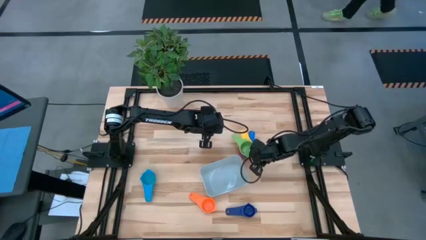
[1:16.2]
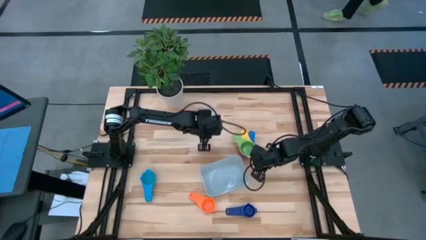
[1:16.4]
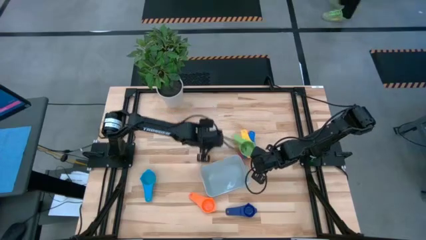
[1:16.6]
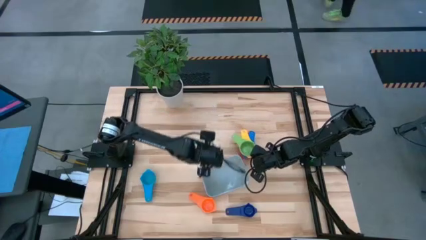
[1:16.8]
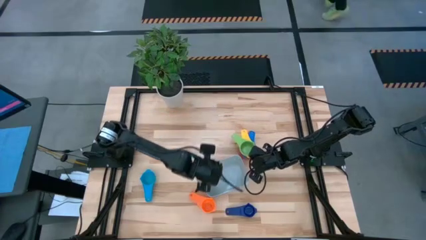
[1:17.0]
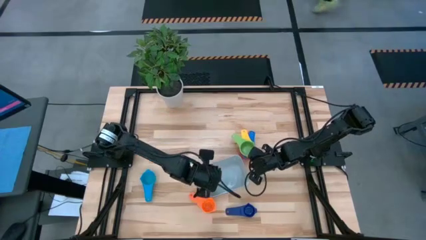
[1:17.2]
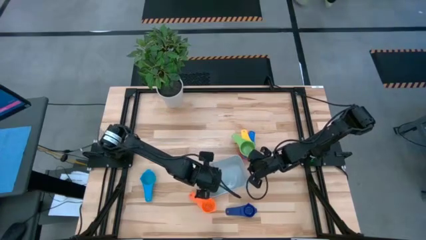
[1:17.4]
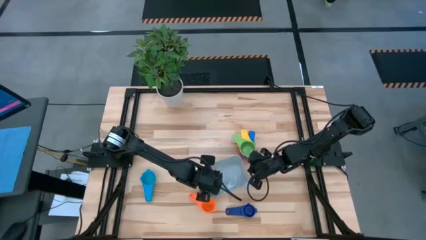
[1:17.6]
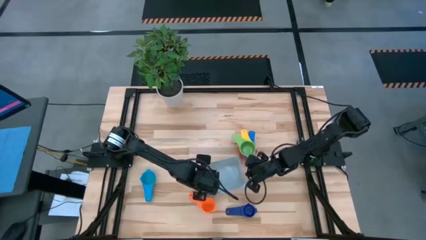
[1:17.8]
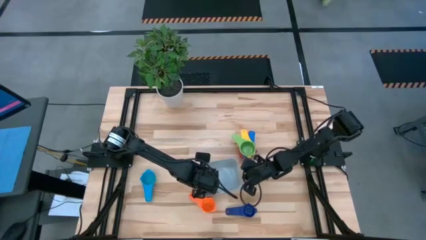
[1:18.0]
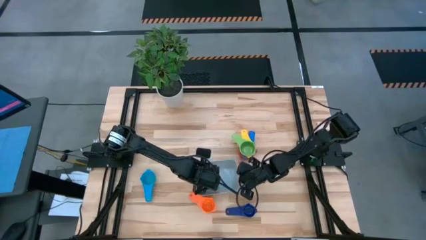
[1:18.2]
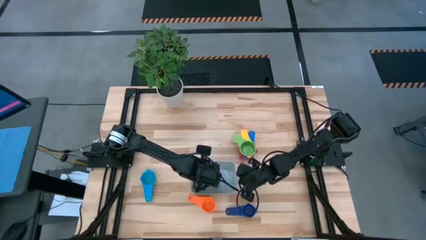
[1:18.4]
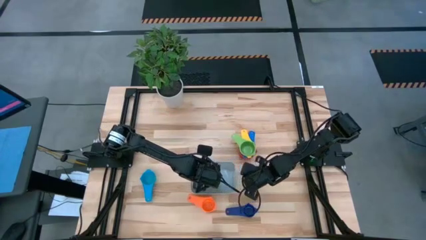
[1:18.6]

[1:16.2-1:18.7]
Task: Nest measuring cups in basket
Adjust the gray bin

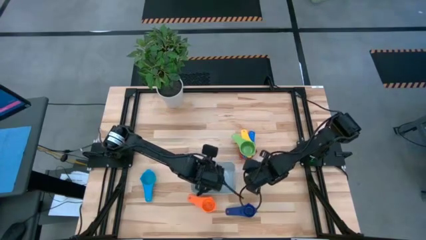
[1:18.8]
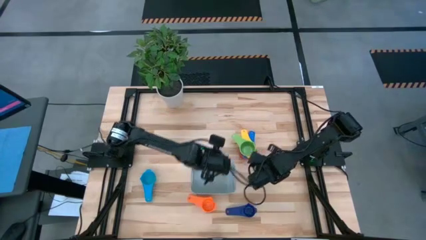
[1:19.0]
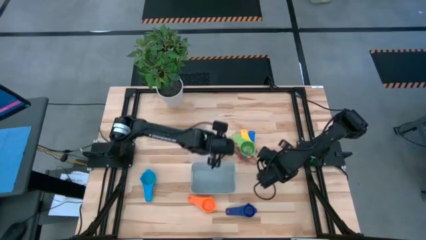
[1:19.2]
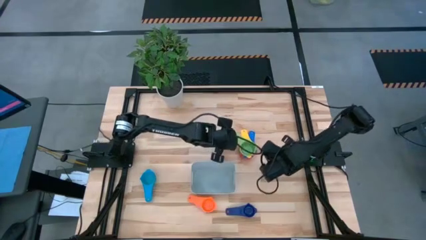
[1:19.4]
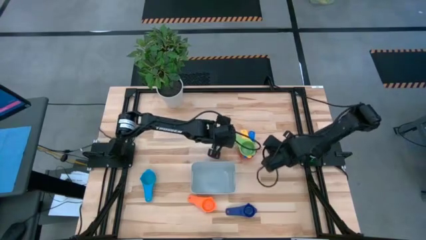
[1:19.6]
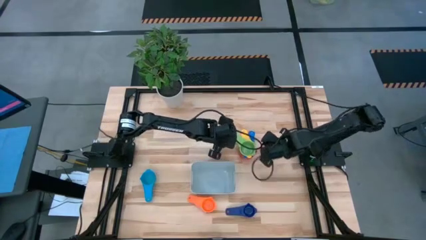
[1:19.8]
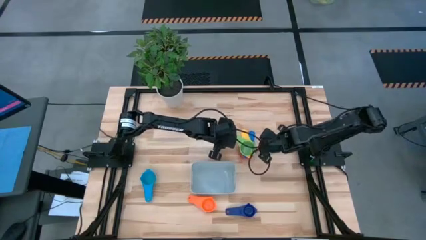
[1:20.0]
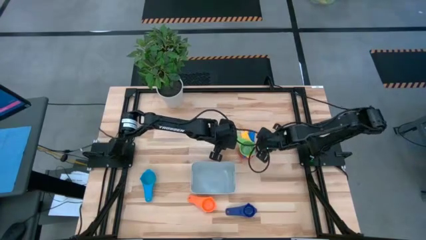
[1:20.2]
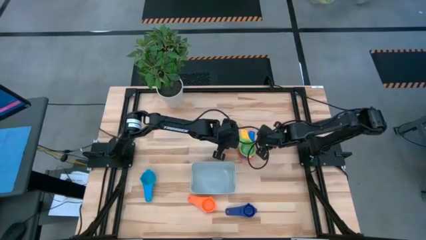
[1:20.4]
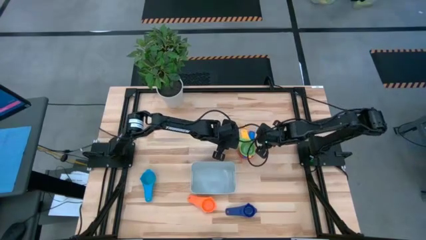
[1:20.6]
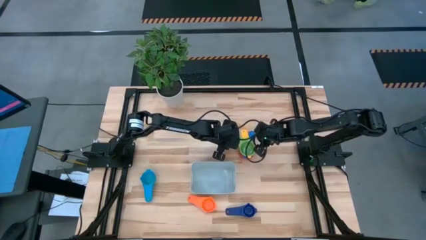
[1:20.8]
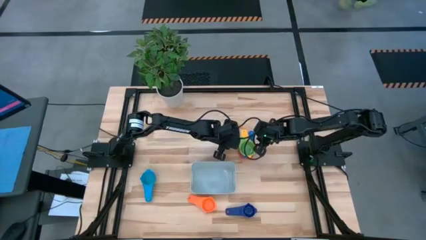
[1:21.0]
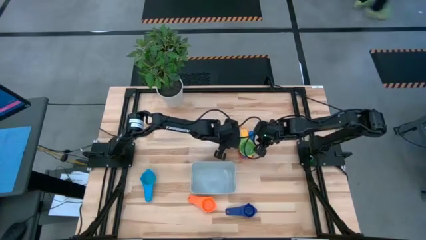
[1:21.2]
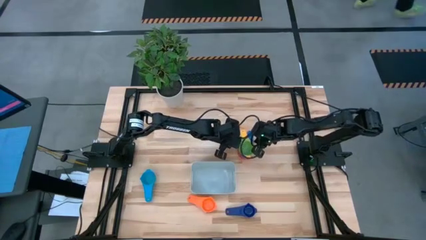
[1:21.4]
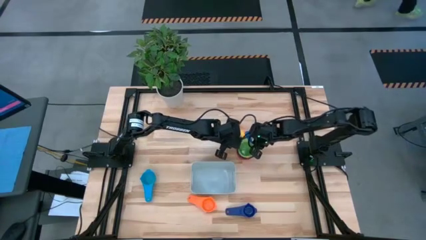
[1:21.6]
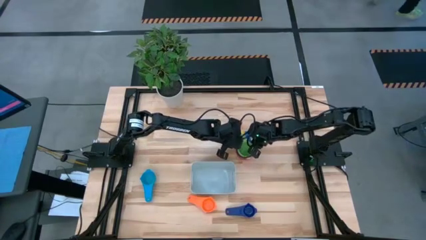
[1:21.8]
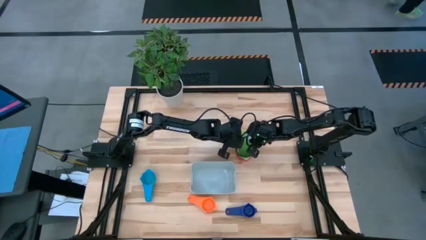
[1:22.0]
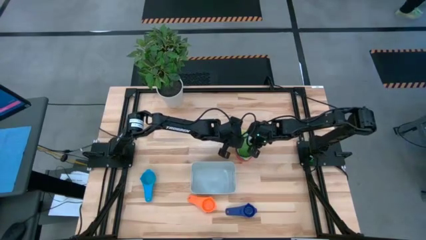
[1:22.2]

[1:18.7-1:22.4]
Adjust the stacked measuring cups

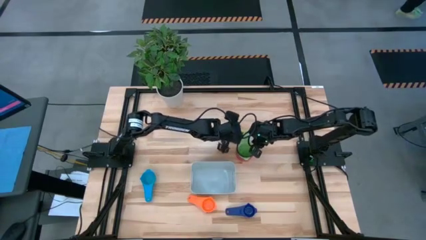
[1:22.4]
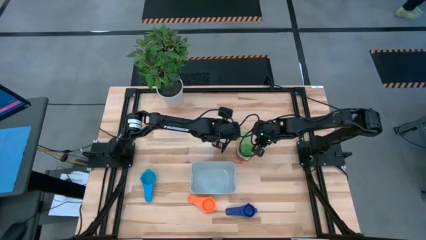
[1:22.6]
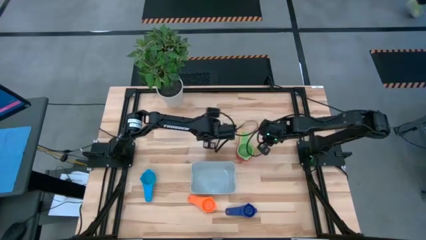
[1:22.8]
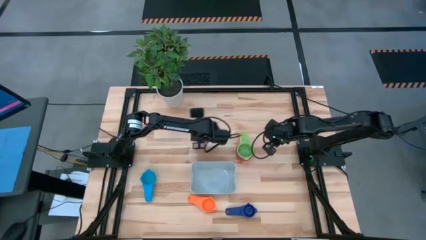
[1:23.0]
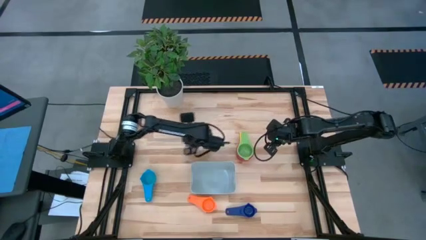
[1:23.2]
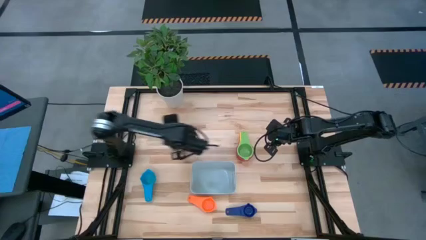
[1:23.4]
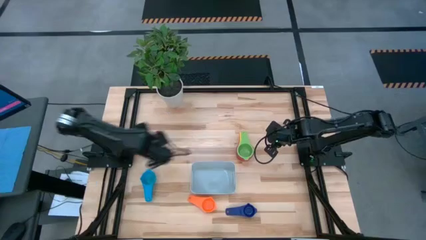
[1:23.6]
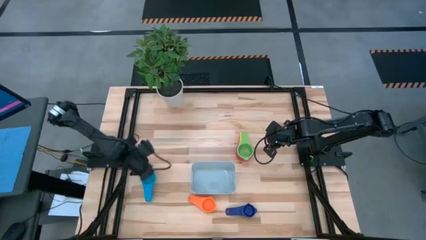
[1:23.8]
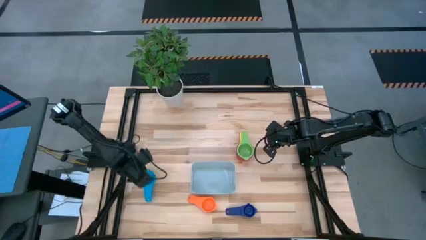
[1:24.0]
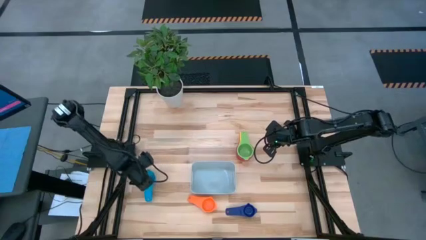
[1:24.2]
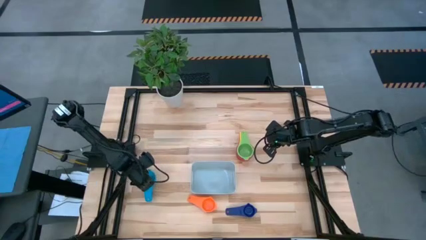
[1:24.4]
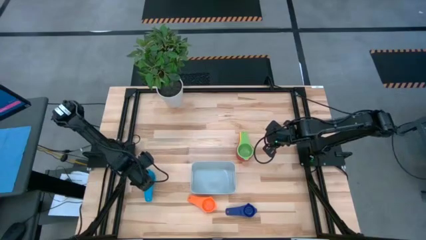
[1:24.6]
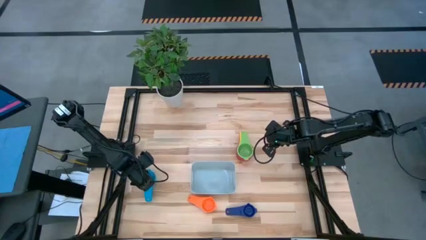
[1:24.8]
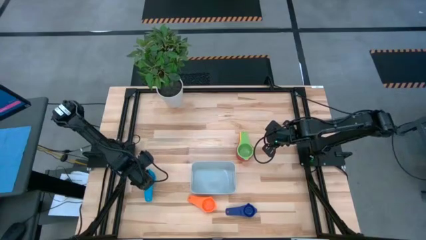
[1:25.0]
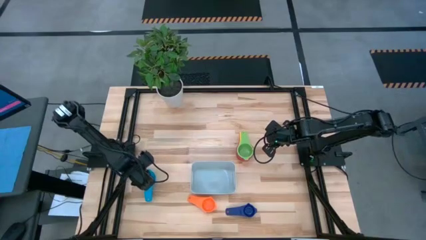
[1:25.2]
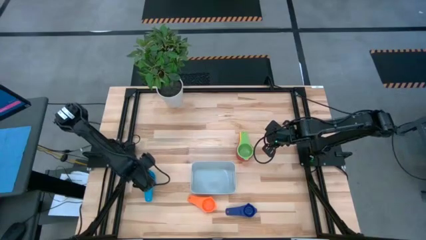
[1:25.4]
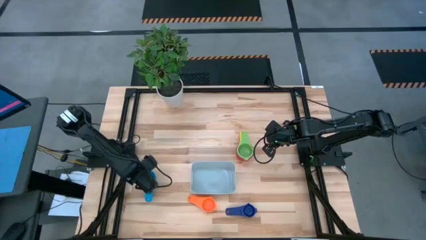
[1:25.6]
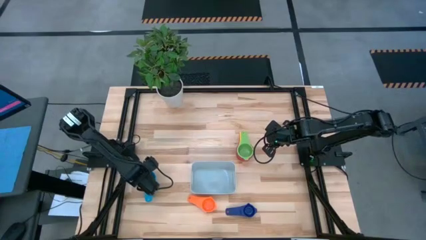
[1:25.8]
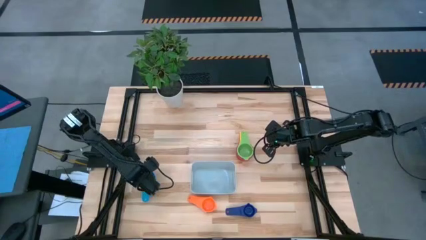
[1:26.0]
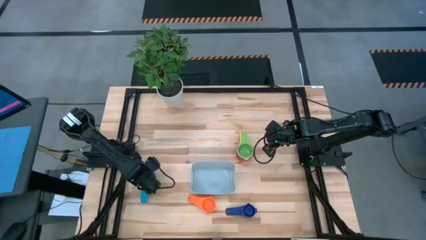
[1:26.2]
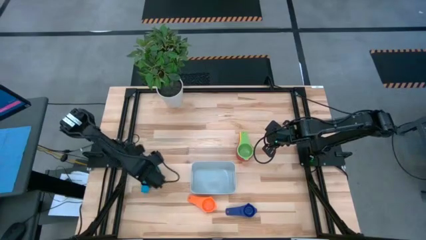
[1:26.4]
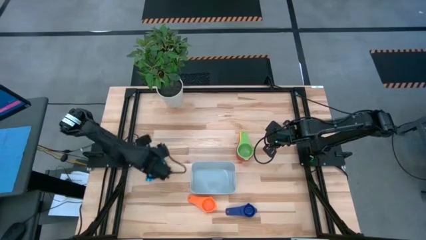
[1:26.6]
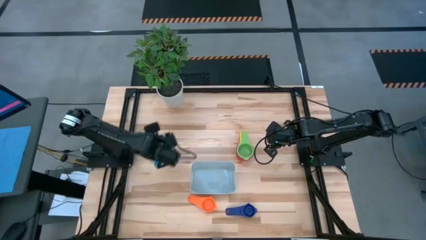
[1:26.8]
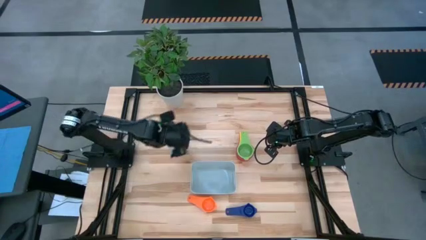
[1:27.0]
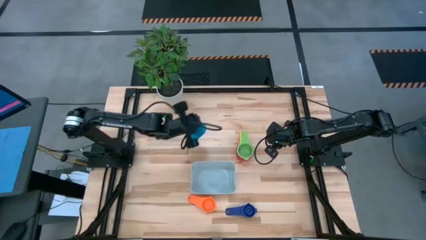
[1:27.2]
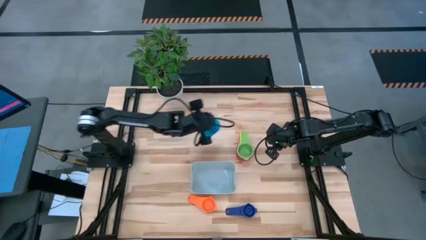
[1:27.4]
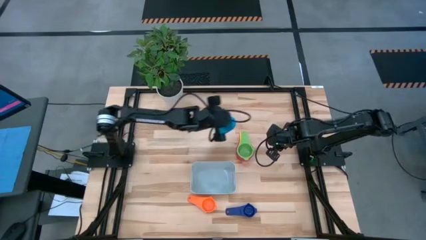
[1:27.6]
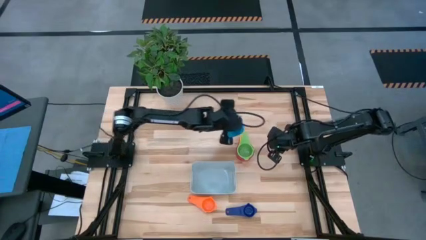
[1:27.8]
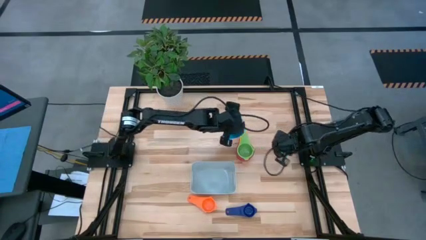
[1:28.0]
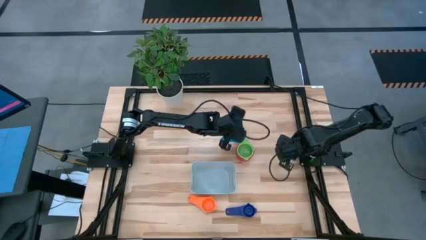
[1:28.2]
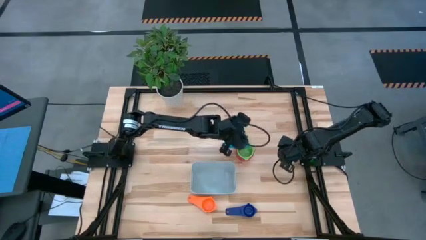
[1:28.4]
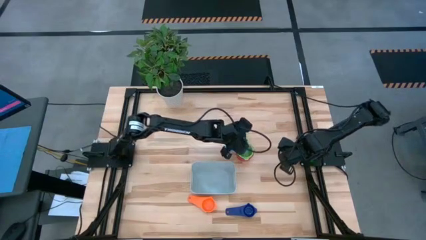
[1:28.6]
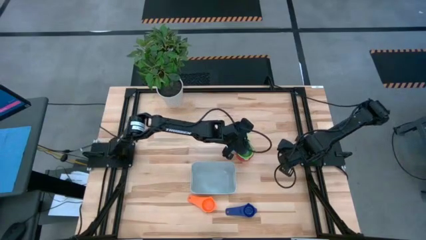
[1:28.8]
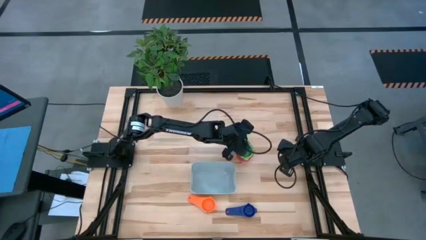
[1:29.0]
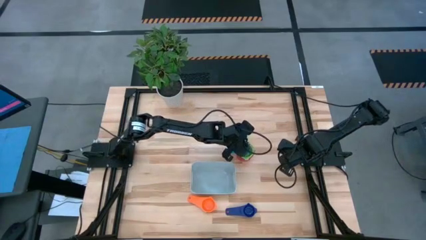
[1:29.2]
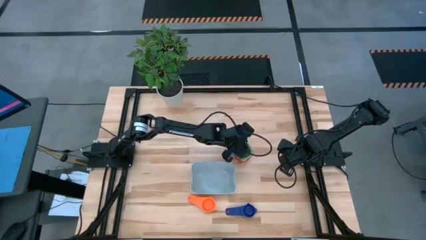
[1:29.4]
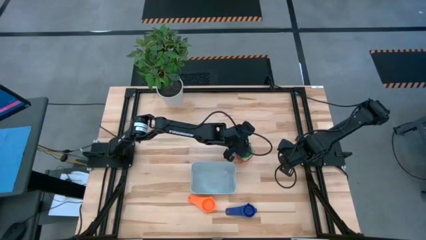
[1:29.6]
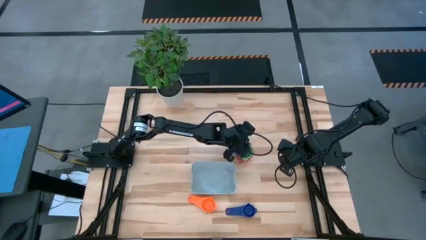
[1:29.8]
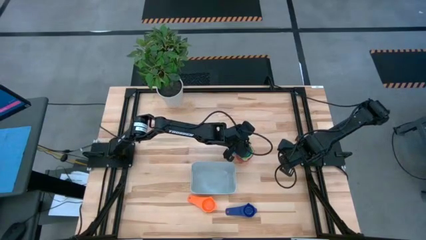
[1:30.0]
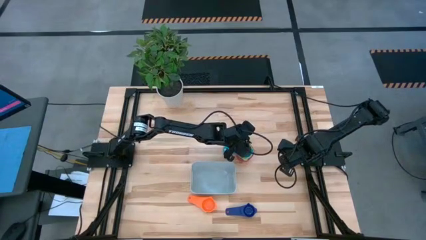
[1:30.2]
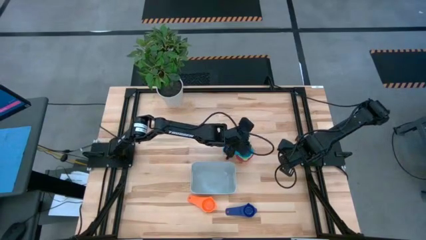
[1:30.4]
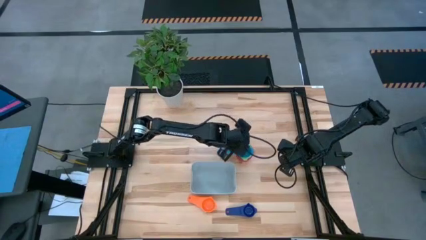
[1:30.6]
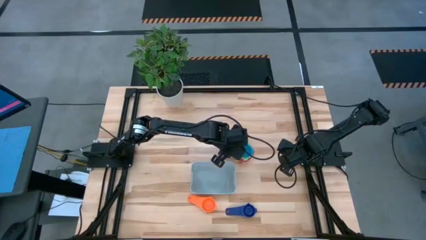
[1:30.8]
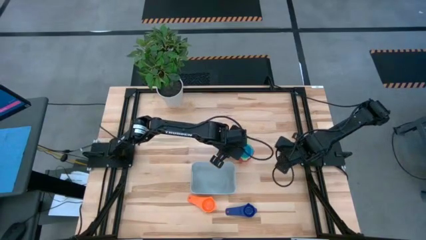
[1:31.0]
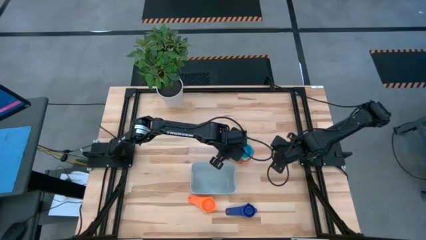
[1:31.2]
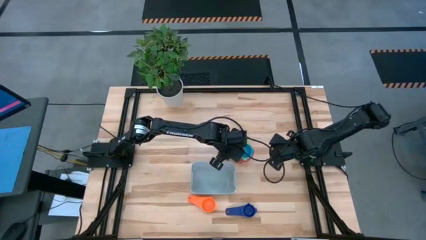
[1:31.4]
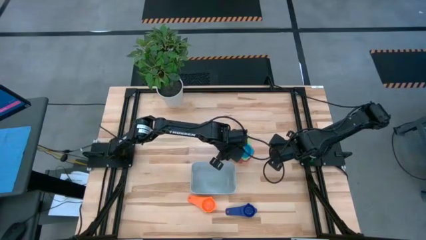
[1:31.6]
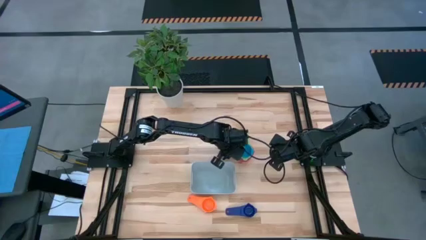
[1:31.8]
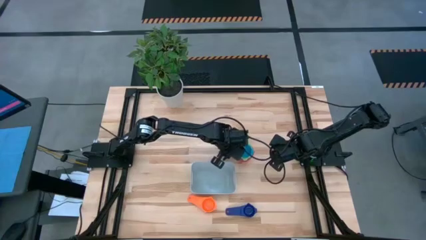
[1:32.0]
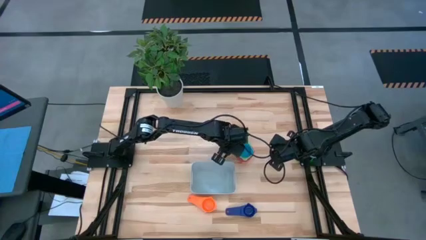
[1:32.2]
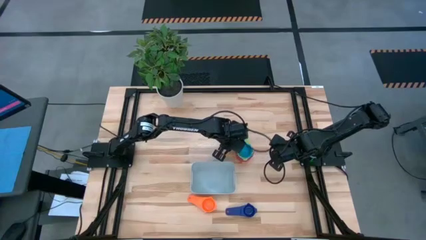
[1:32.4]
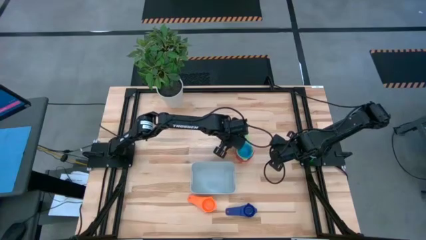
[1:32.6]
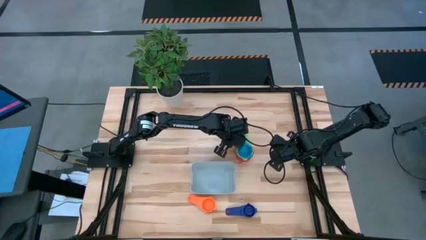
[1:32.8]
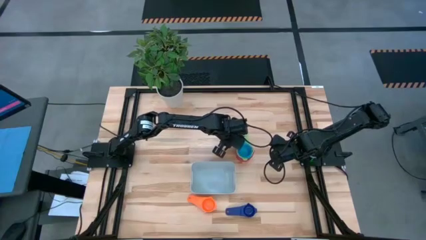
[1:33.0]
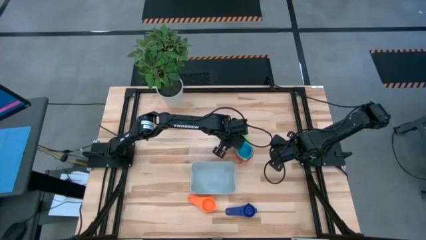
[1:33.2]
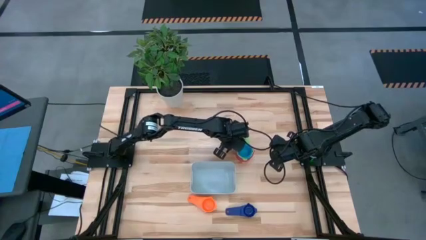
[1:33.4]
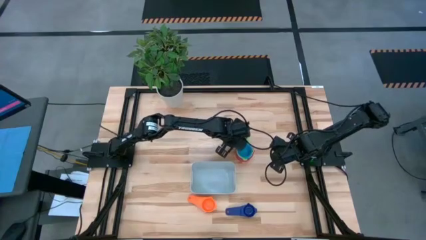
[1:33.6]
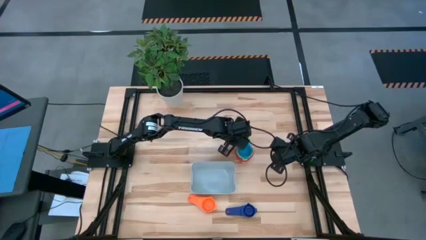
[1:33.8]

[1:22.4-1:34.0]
Stack the light blue measuring cup on top of the light green measuring cup
